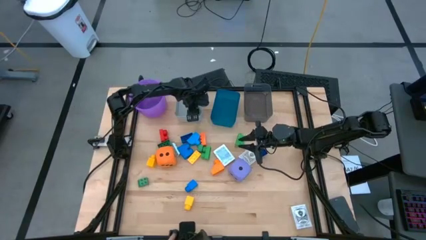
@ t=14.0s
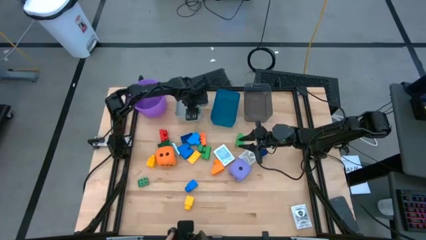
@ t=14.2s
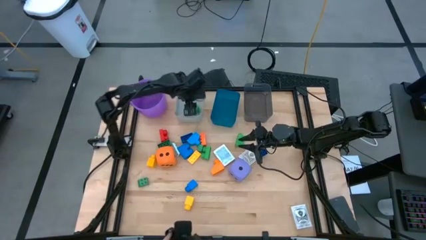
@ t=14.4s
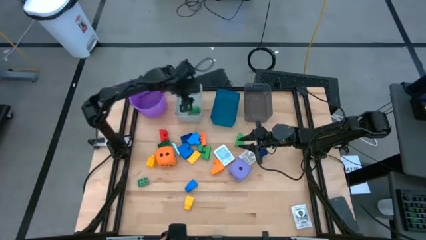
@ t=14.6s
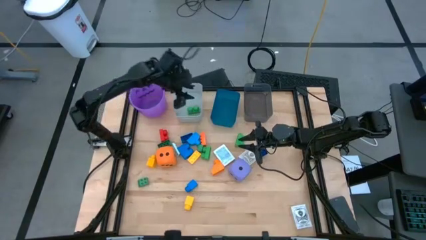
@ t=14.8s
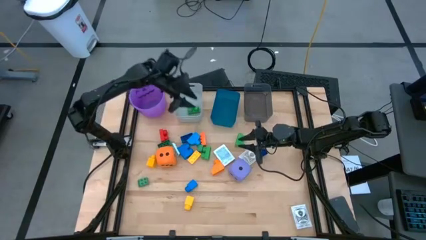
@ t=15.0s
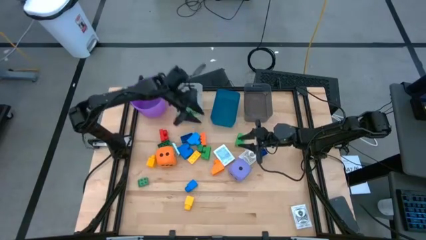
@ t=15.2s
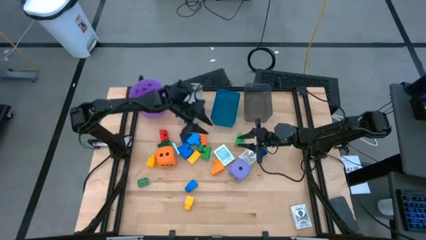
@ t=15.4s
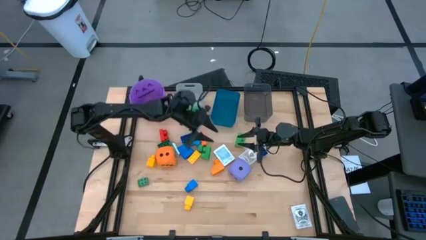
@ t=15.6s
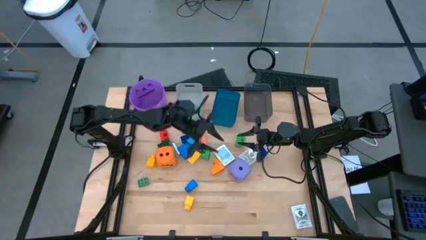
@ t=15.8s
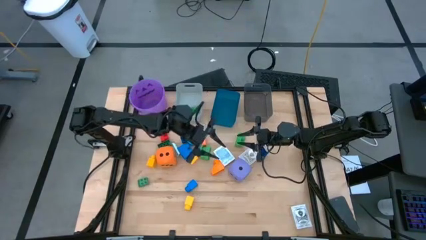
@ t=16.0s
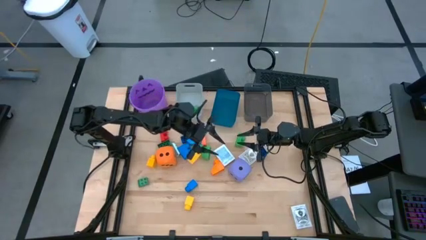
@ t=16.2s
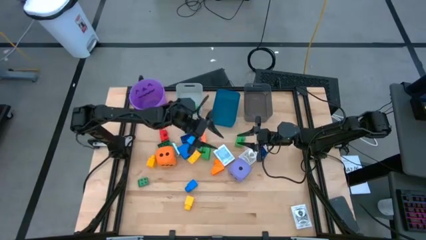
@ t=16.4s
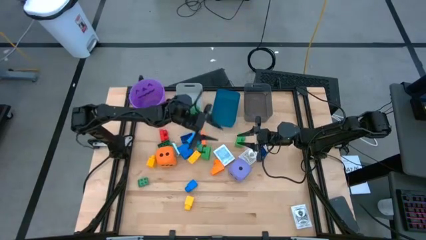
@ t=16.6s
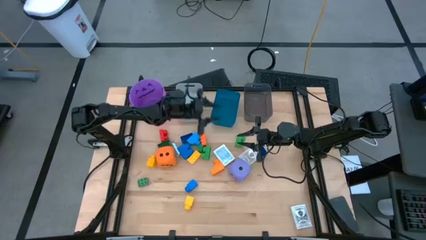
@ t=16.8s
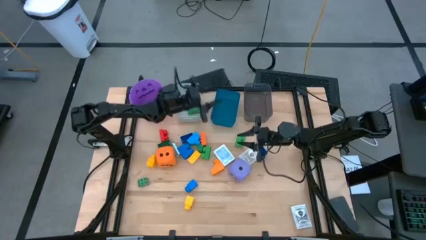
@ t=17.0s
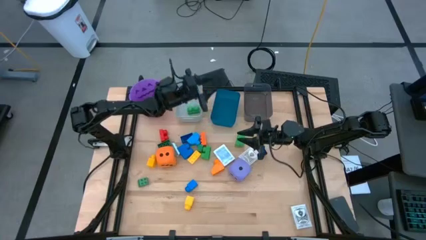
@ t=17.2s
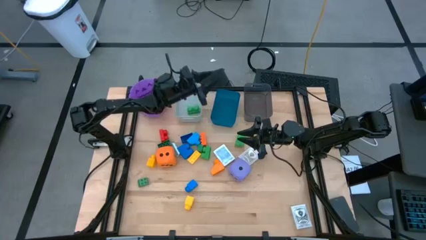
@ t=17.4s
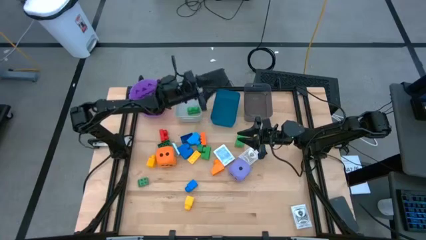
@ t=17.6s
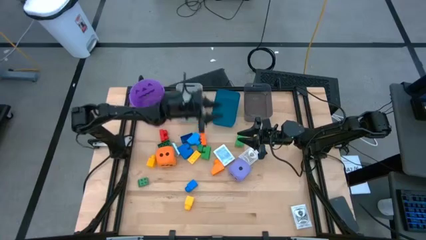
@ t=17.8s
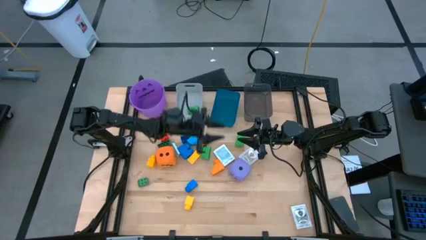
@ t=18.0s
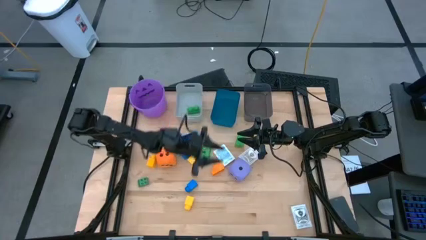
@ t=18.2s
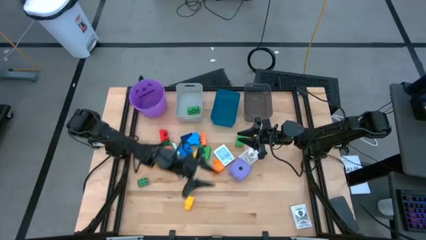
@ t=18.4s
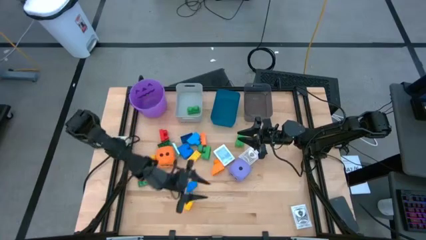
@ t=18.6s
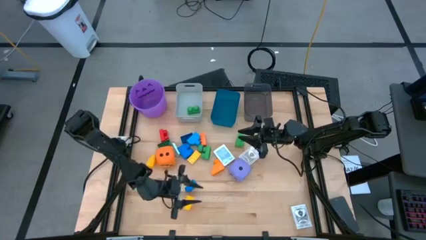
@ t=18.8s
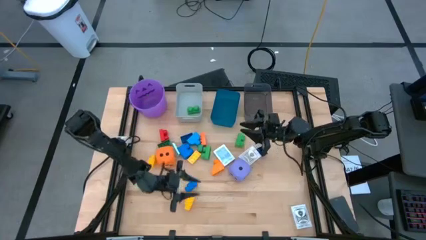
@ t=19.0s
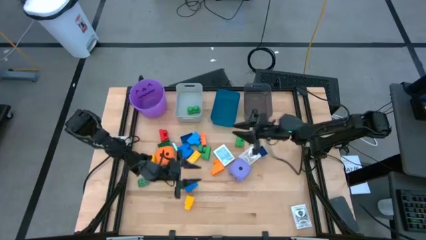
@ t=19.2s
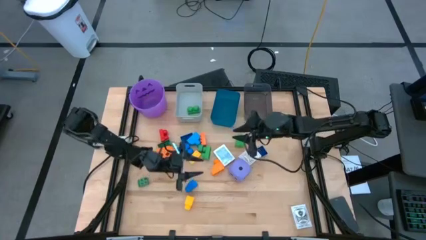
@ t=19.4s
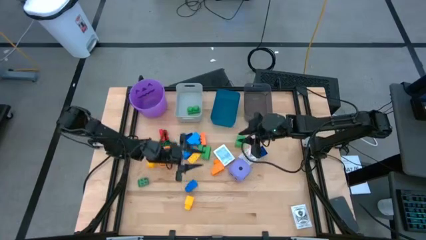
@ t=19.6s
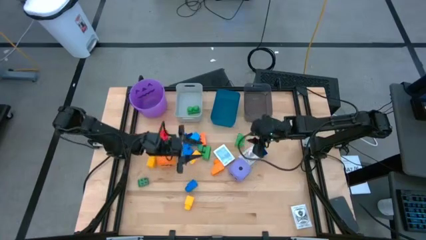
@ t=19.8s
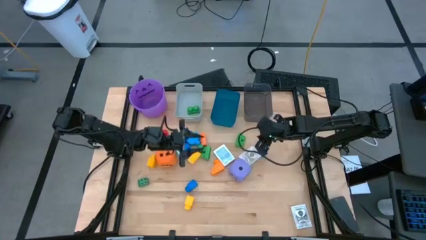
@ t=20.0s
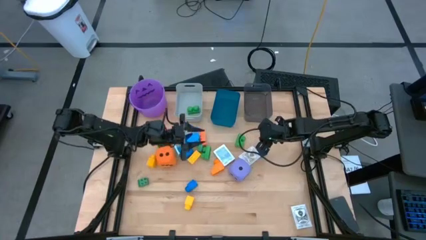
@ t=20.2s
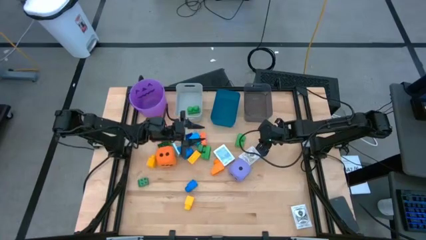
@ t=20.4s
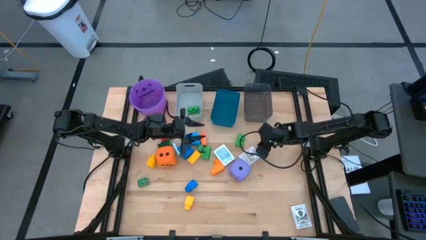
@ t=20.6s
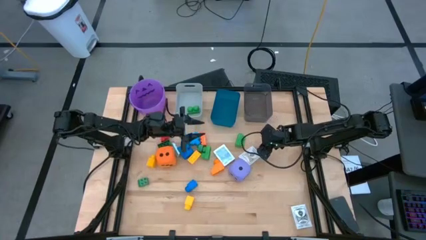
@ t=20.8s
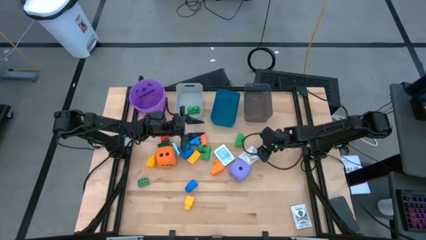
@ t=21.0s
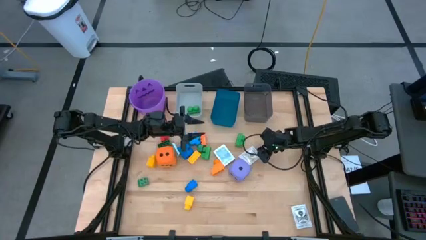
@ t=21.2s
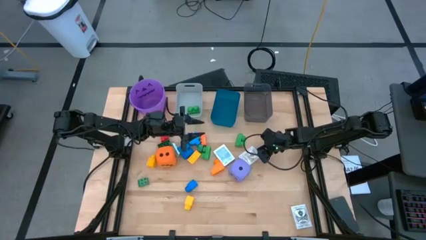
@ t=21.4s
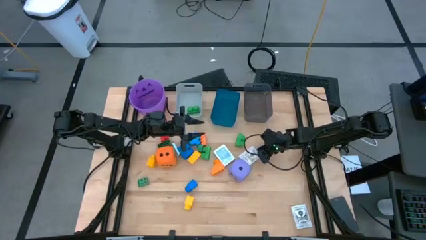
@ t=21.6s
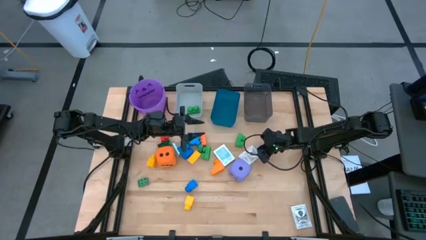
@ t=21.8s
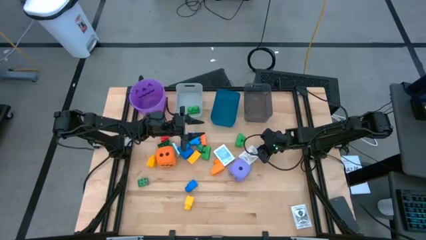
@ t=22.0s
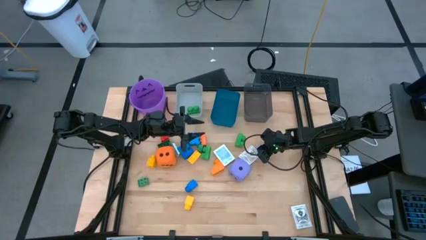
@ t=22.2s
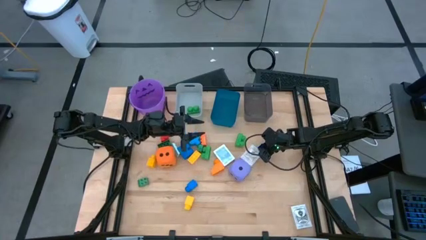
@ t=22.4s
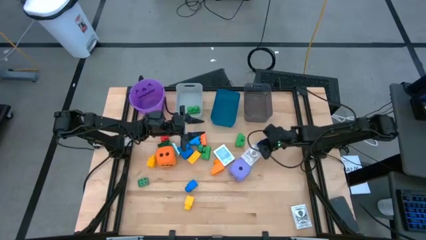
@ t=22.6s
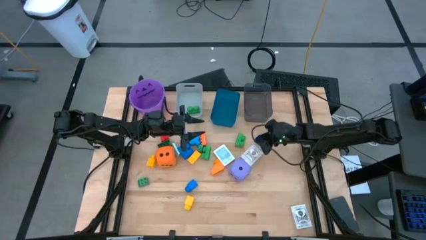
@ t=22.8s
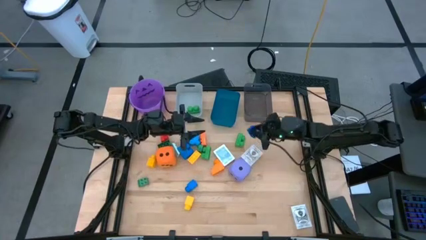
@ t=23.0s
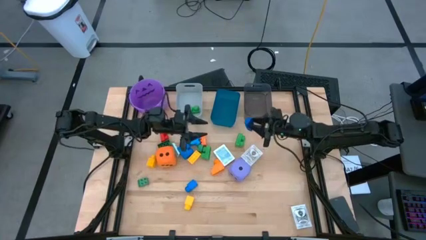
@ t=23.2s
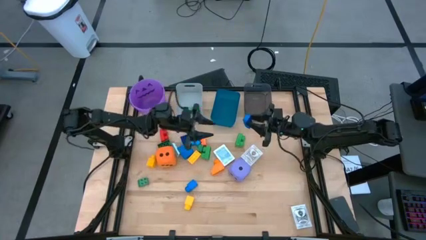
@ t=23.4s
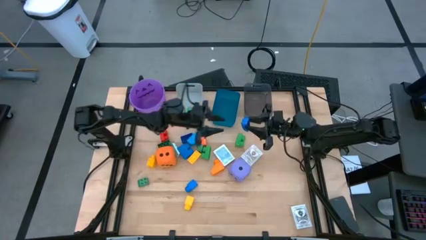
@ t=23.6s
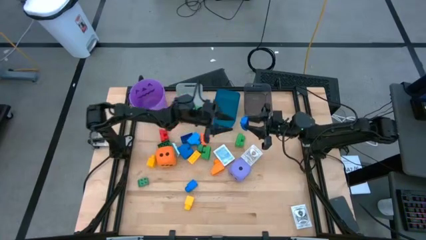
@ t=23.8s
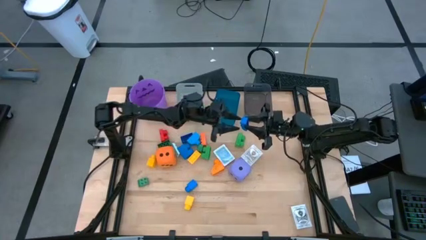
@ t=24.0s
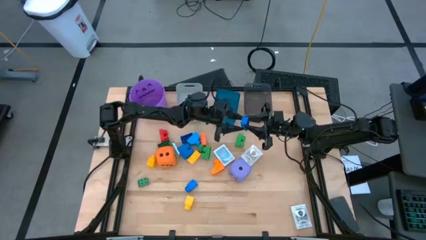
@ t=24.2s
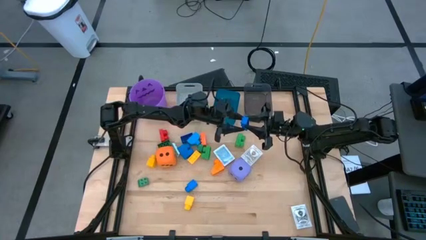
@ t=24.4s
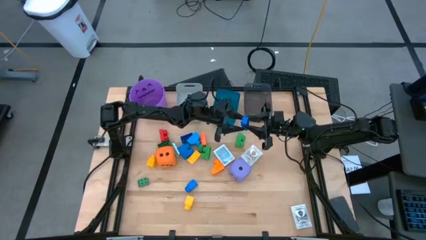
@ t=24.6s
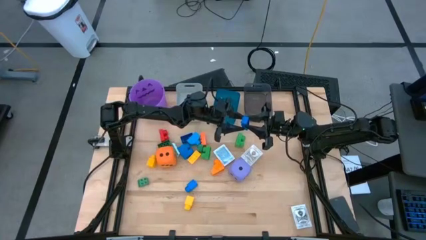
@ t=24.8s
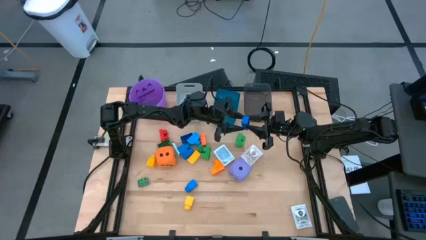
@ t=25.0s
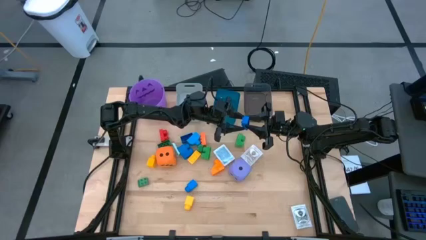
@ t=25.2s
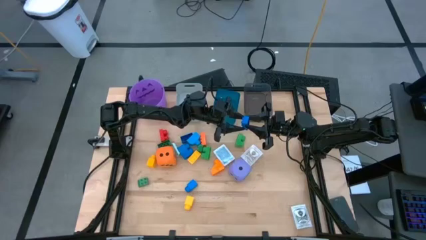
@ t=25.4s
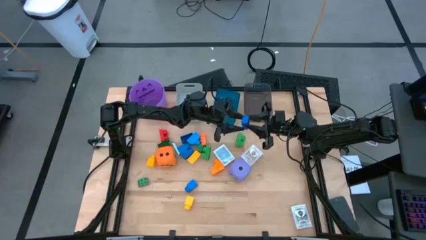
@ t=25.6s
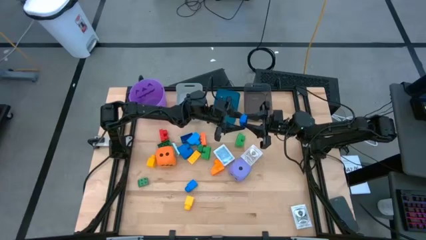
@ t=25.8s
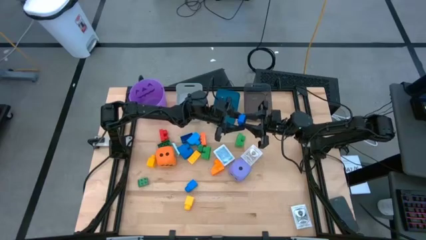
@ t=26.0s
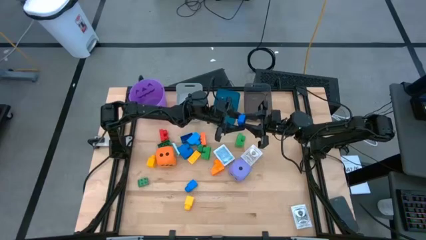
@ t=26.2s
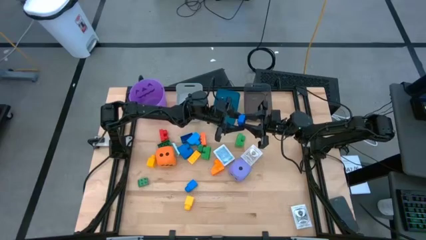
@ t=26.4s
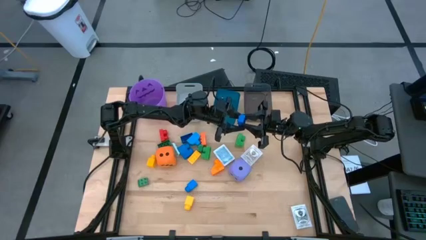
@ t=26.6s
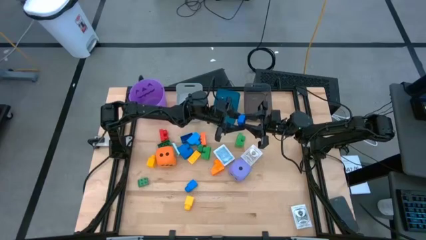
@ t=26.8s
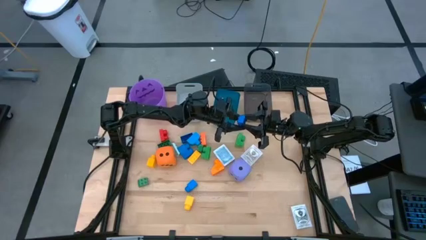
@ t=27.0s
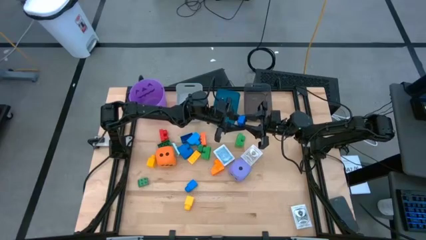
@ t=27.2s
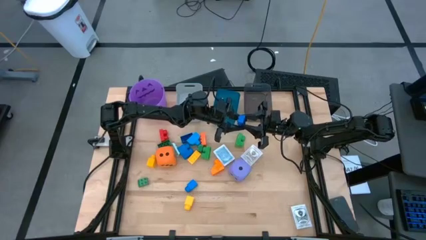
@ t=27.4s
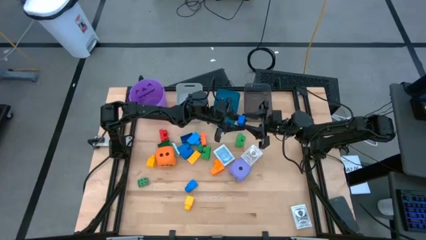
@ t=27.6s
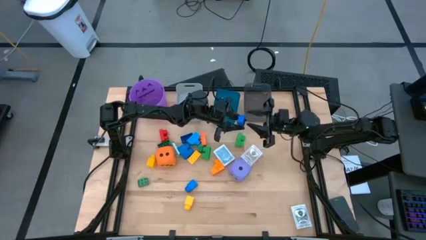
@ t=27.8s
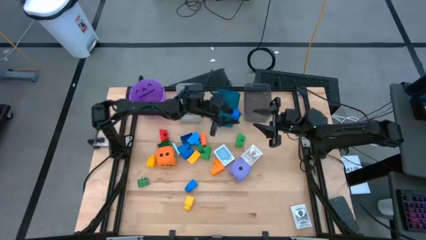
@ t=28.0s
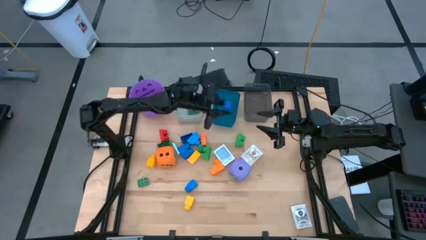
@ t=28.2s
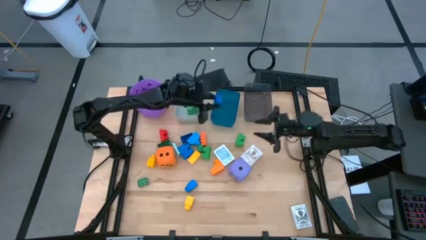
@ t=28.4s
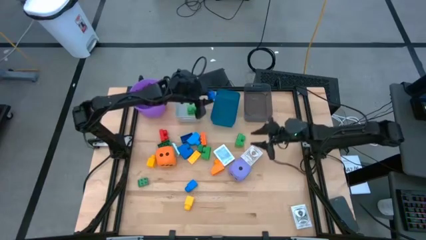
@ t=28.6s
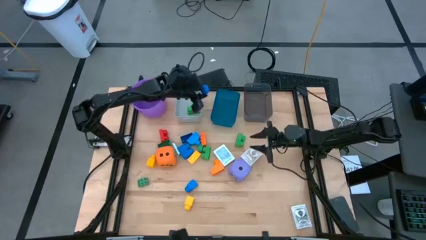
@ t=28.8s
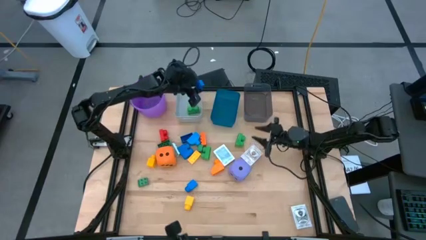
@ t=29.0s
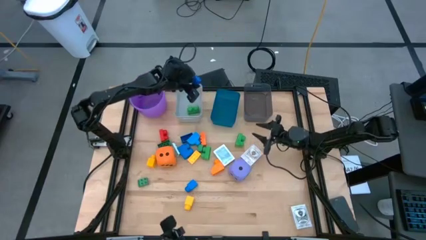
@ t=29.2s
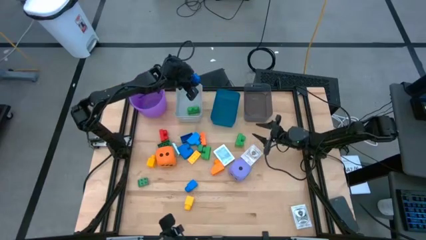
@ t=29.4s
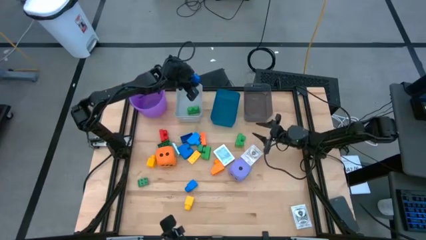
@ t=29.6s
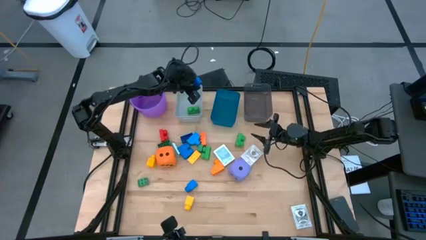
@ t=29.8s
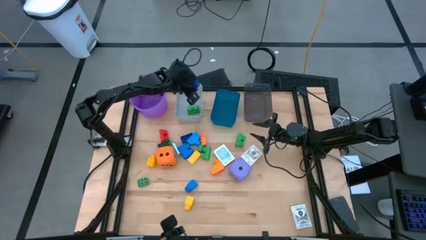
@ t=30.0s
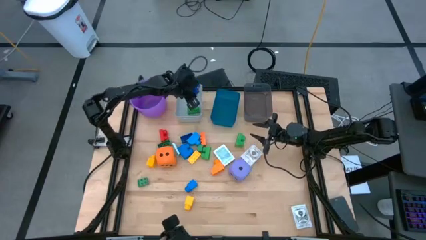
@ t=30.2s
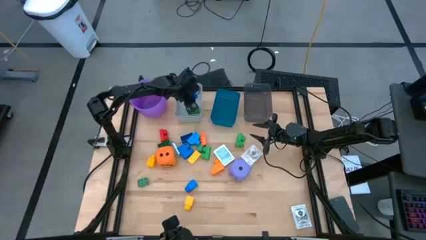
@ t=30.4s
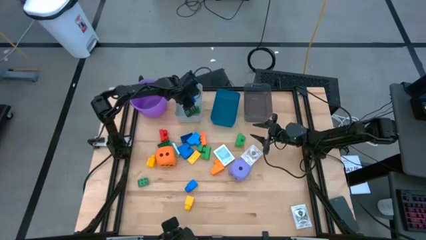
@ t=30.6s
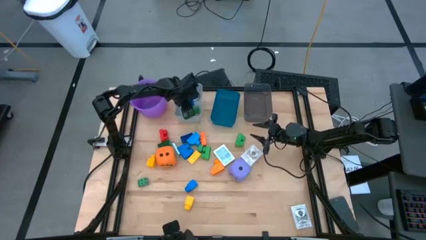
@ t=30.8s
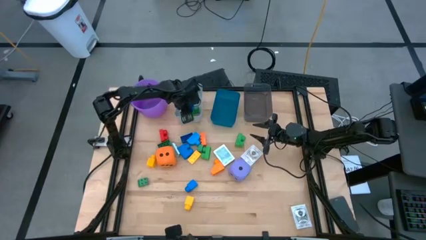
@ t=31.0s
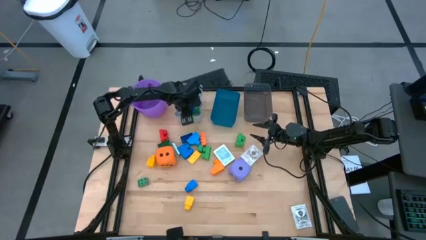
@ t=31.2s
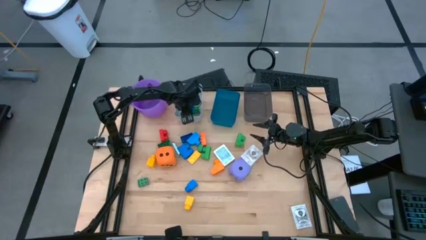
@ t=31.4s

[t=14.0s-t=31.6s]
Task: Pick & Place Toys
Put the dark blue game piece into the gray bin
